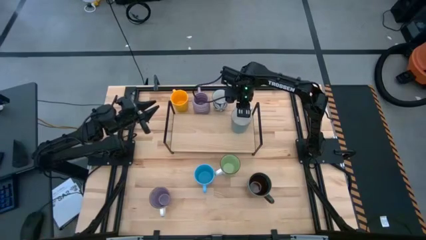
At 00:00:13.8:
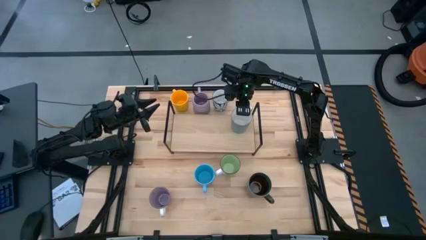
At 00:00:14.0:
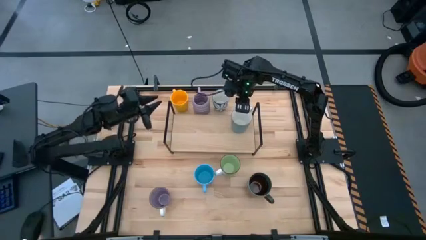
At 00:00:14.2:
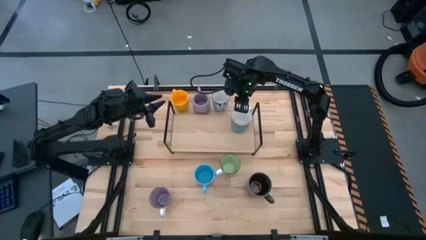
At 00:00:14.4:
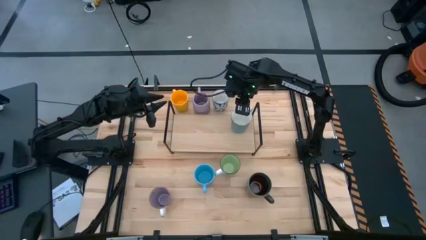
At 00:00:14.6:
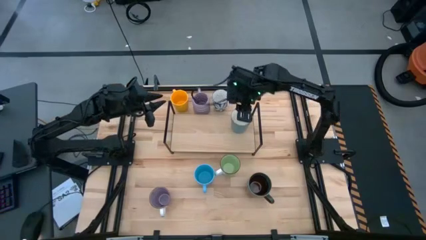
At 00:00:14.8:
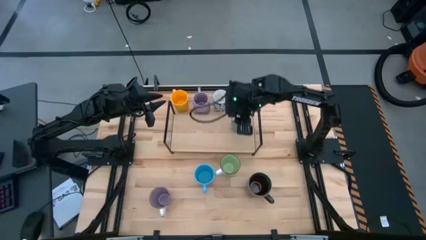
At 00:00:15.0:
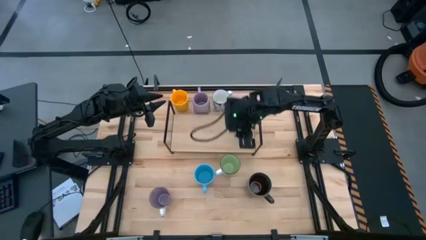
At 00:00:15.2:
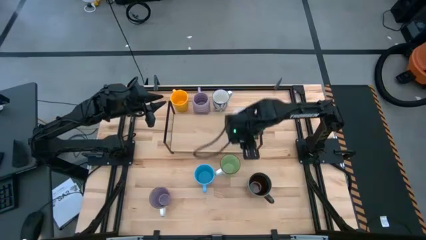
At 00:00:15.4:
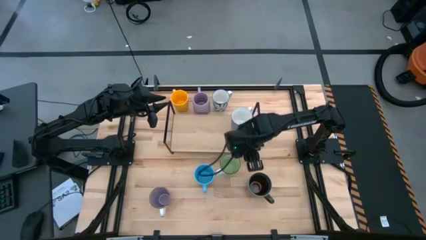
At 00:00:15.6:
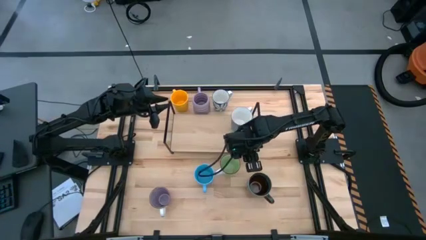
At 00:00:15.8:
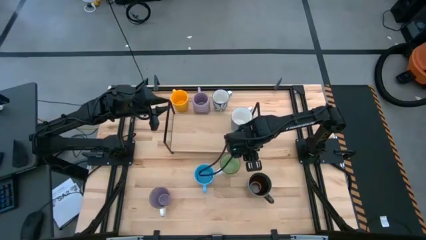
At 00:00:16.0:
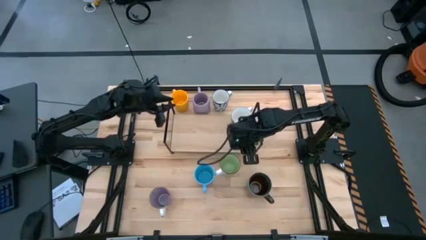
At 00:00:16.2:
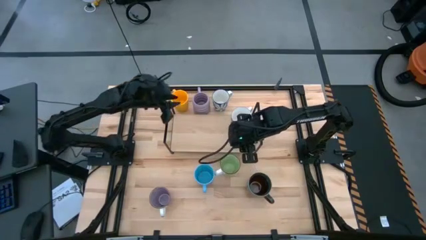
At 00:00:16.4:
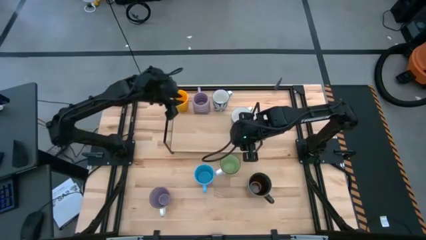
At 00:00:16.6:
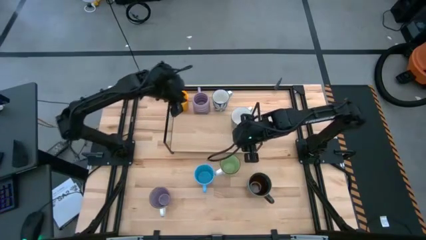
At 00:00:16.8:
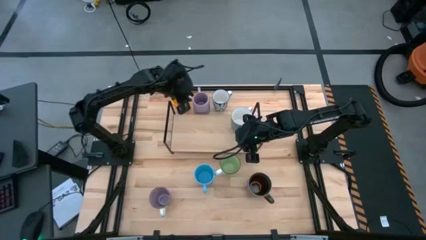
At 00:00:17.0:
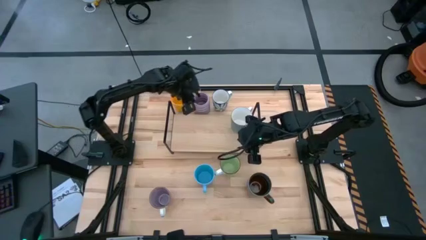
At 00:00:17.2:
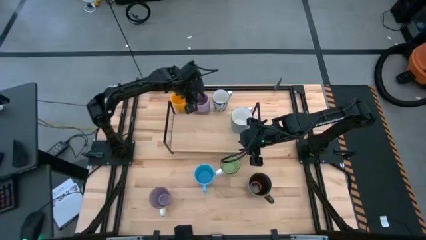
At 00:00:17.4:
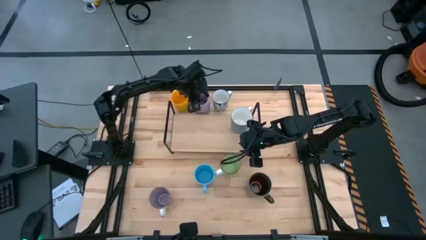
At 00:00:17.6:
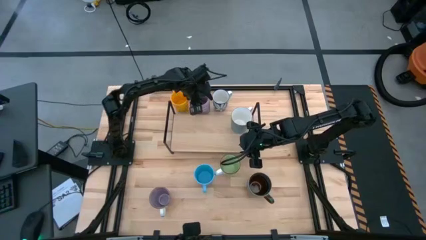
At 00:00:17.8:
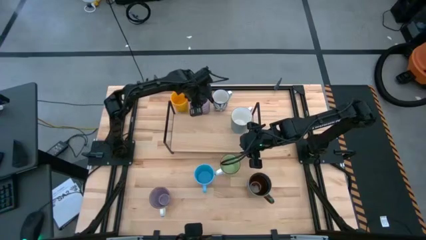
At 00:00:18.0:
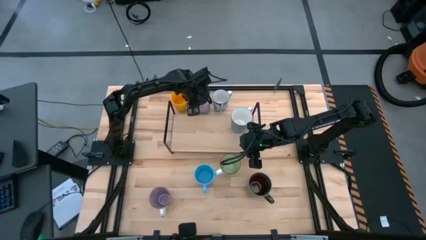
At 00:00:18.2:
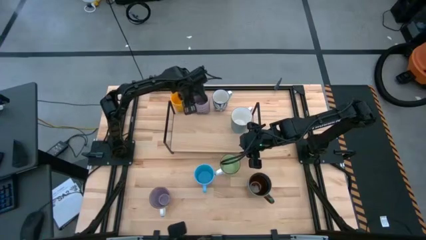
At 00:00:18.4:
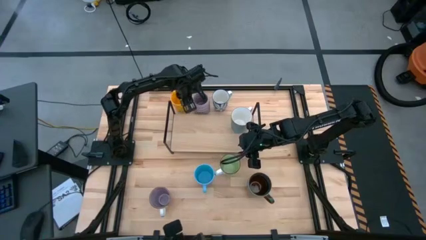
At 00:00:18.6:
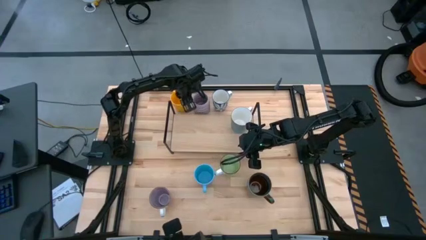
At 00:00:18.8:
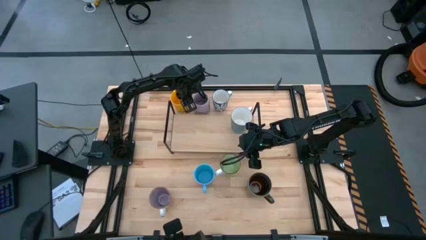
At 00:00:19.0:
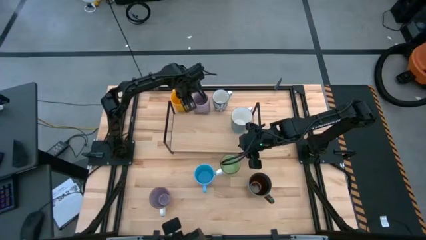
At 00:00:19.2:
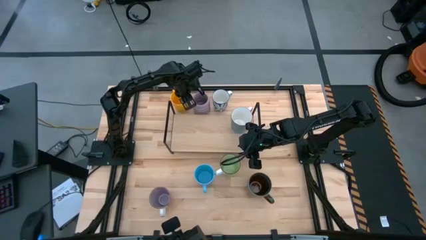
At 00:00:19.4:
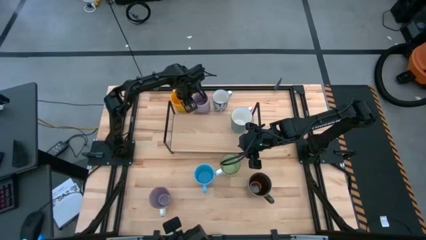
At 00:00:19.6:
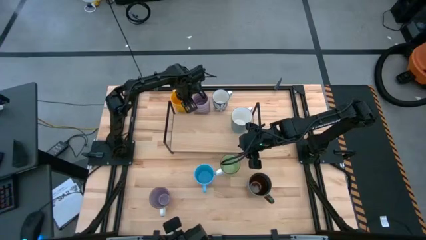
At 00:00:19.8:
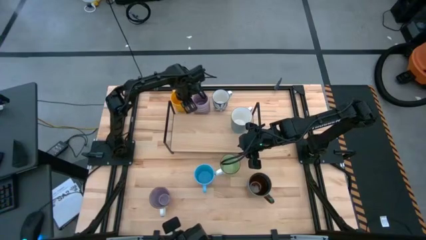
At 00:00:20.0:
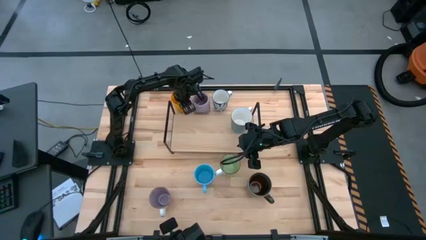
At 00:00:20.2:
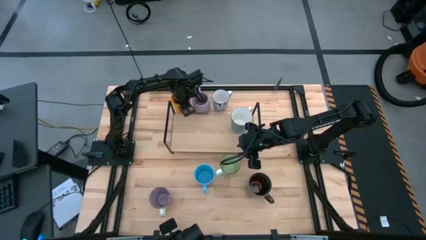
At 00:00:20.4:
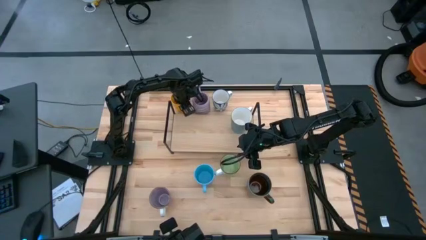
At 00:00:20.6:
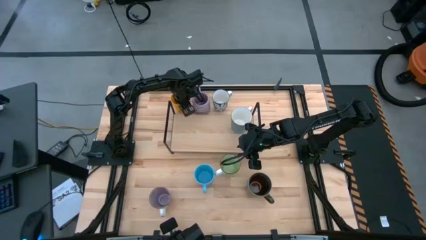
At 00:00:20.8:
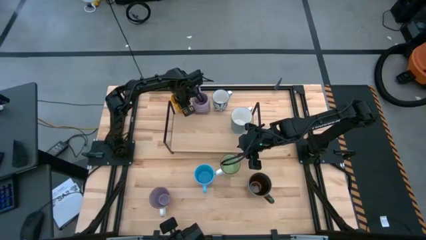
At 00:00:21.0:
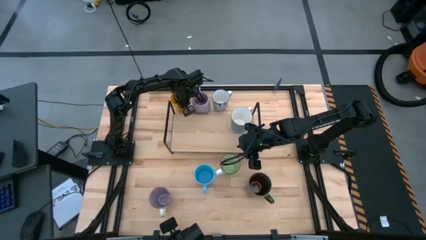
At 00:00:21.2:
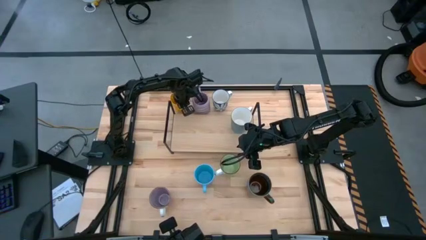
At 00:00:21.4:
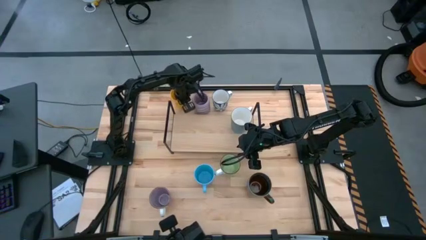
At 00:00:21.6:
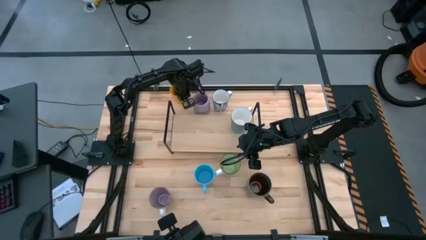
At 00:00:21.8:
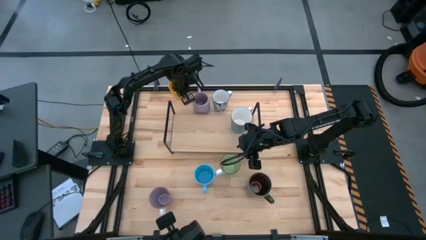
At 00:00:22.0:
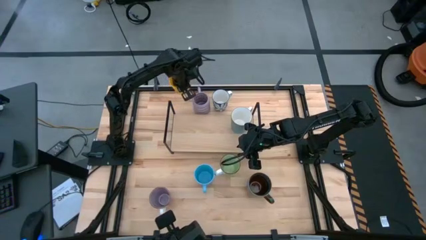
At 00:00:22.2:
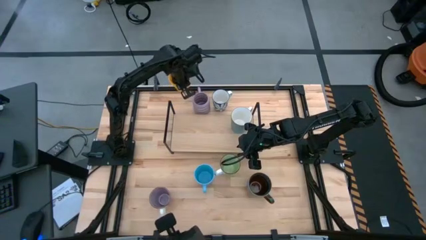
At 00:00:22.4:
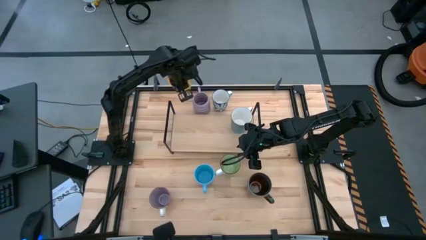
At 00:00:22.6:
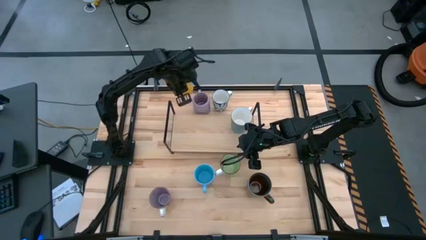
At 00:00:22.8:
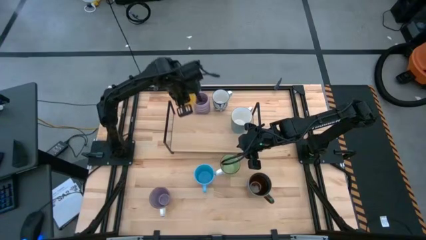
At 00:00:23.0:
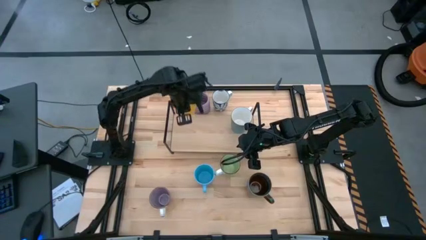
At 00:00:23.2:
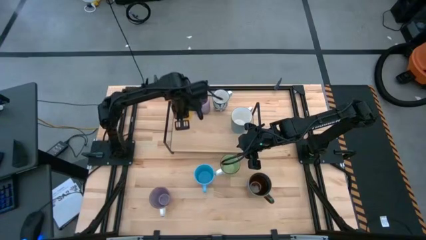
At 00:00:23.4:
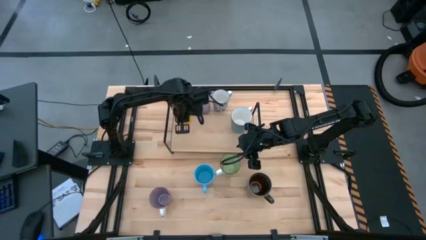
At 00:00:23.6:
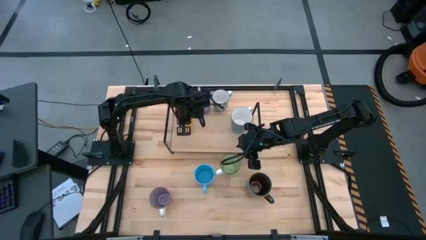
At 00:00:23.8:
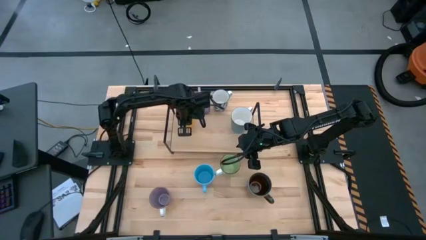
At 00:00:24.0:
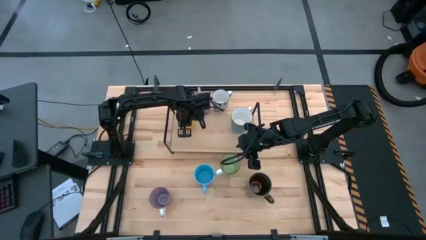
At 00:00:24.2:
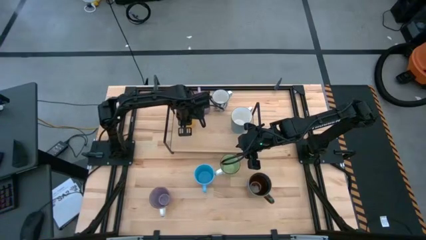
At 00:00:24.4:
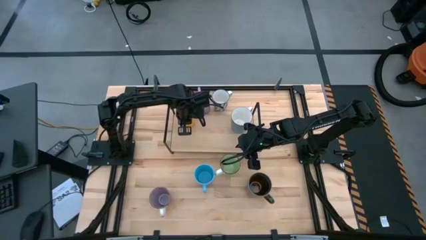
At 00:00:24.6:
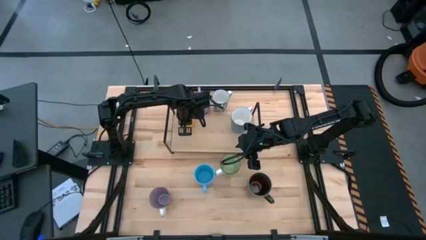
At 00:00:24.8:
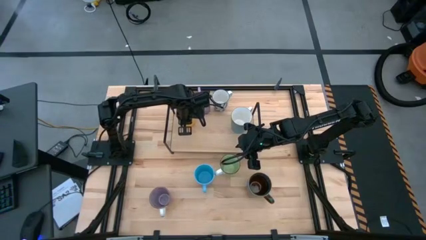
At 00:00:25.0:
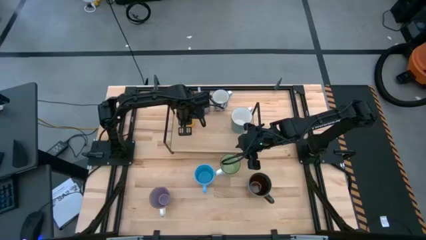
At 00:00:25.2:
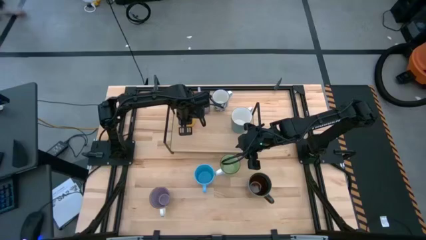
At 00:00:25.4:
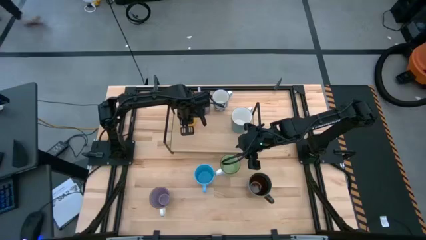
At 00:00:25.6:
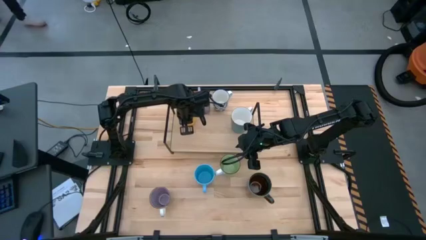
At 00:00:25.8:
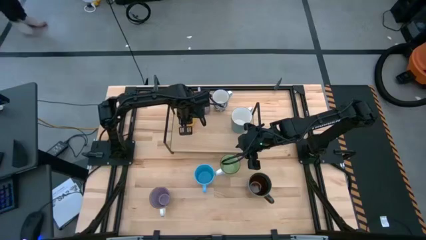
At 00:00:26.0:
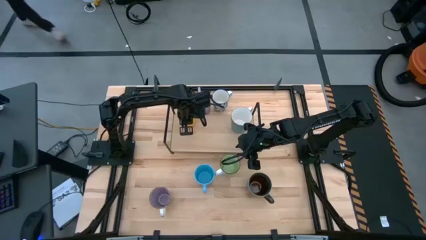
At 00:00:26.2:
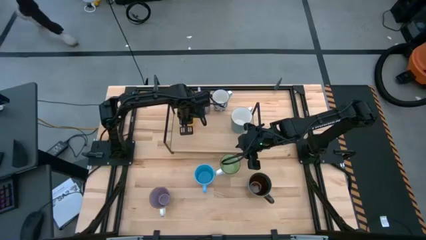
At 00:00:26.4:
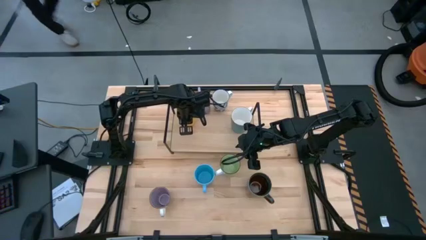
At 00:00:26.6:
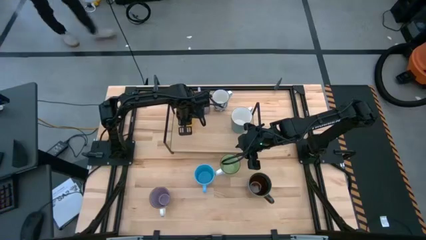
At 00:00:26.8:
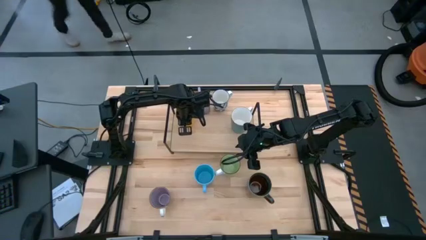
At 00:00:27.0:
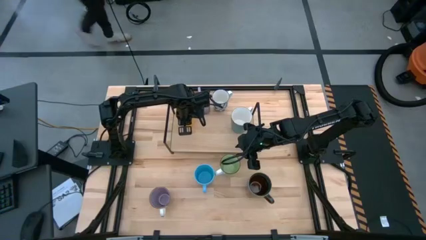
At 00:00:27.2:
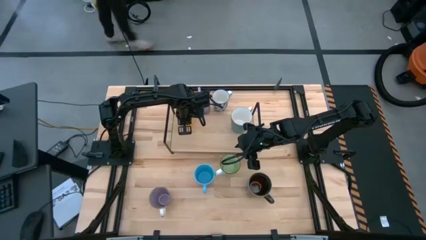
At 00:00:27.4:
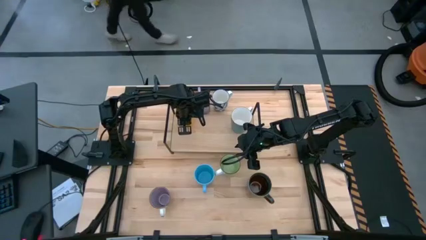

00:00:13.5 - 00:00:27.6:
Task: Place coffee mugs
Put the yellow mug on the shelf
